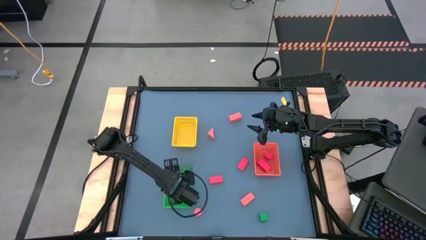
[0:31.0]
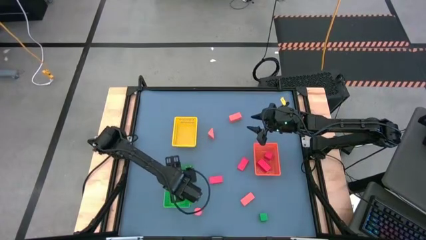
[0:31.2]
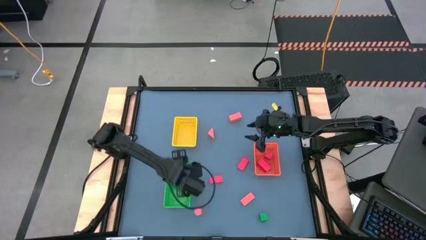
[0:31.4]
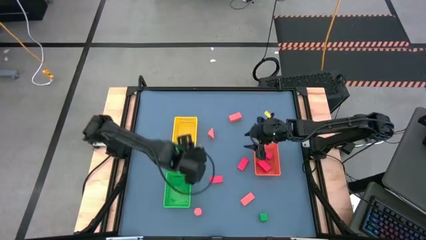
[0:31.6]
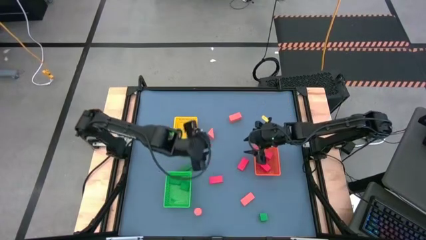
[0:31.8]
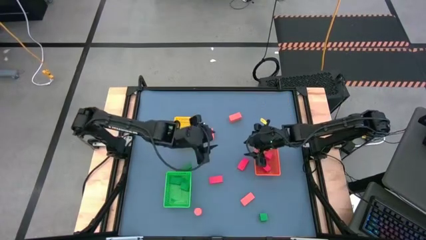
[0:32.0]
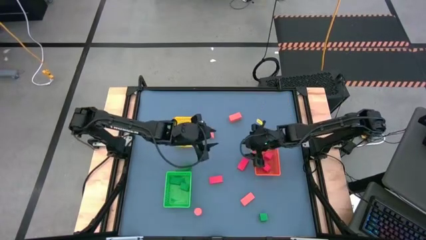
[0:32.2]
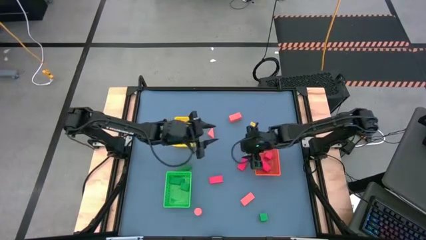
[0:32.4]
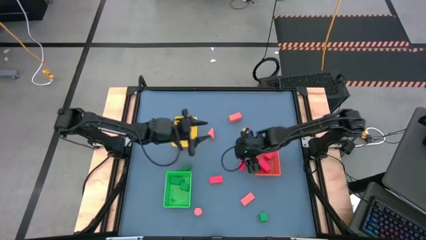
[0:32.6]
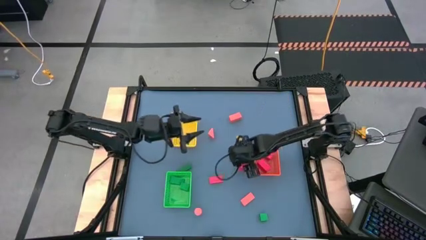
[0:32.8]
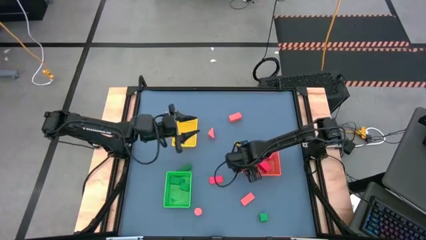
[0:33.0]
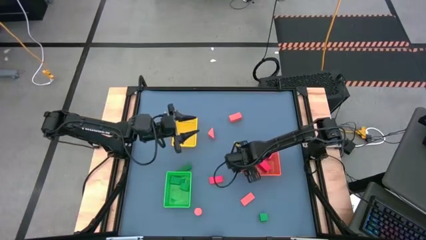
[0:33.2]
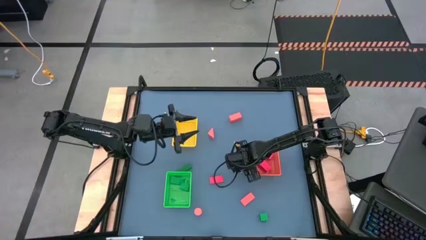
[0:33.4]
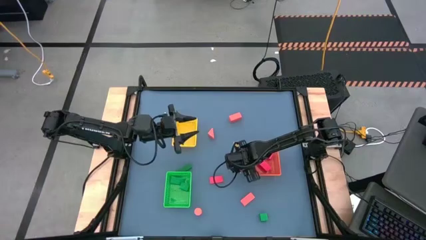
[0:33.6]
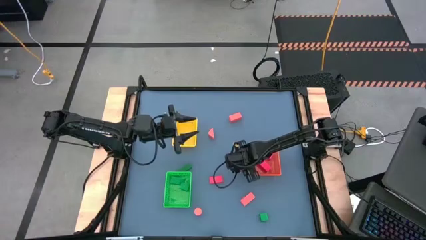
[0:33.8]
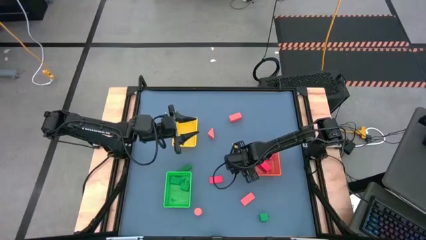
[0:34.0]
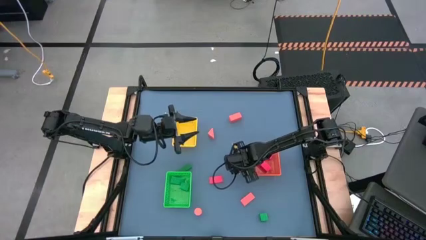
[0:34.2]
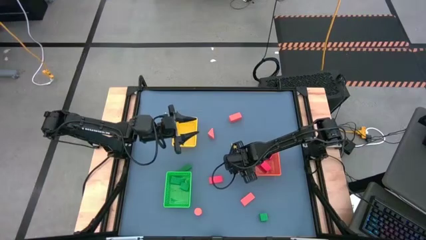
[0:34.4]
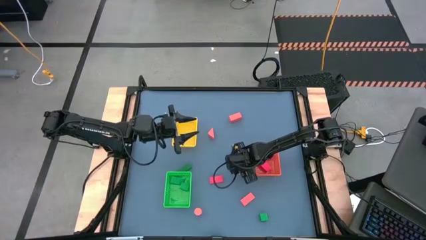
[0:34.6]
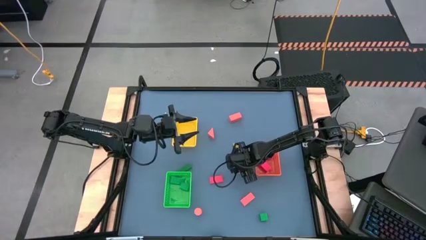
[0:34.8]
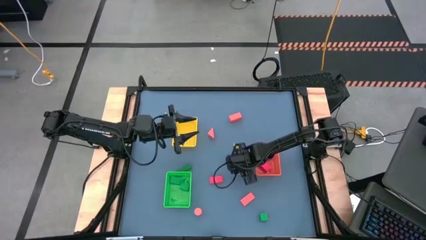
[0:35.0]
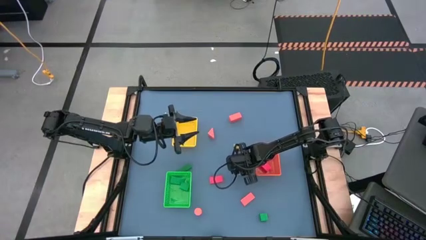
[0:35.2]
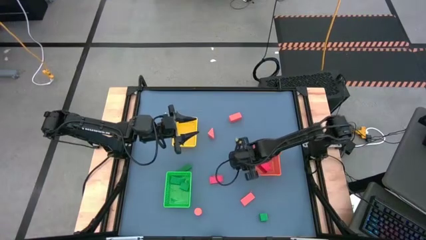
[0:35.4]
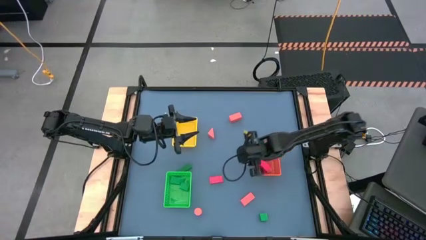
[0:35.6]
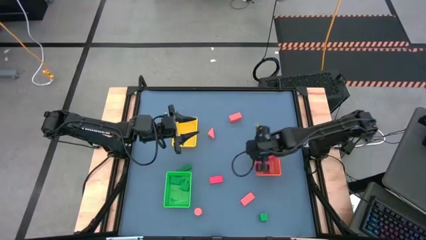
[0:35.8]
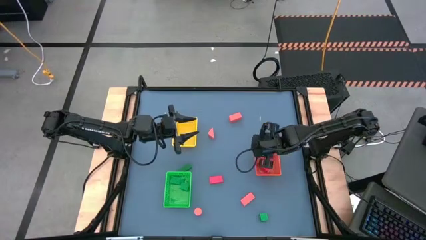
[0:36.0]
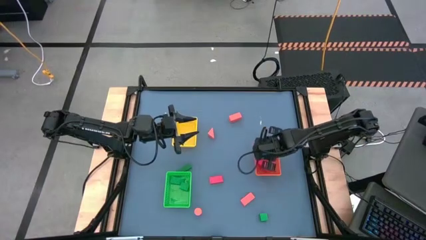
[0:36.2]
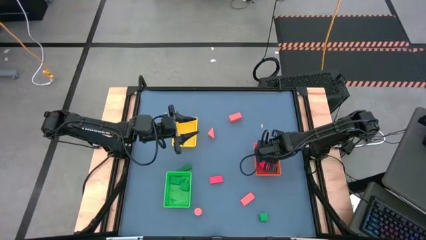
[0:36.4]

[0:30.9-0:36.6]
Task: Sort & place blocks by color
Put the red block into the orange bin

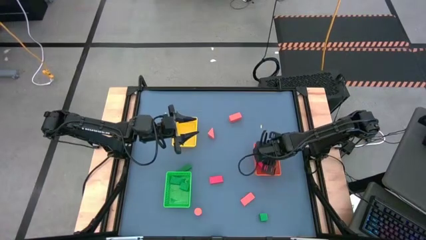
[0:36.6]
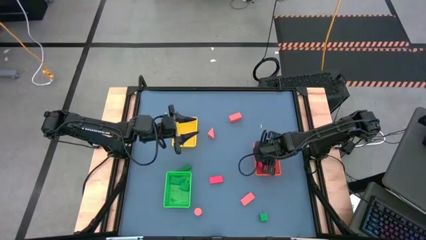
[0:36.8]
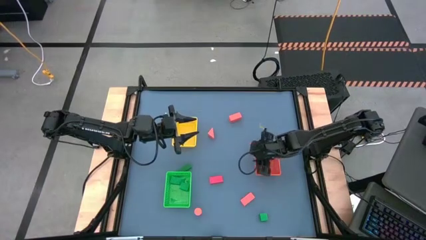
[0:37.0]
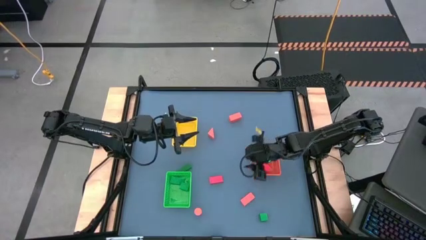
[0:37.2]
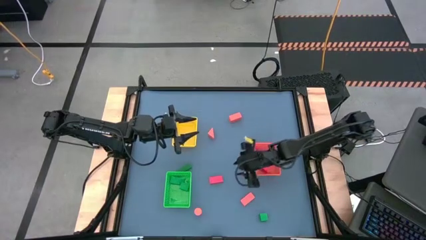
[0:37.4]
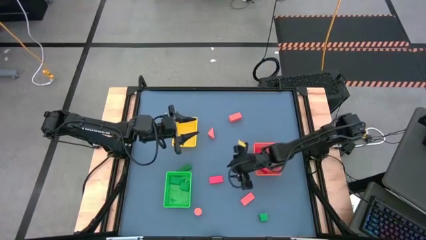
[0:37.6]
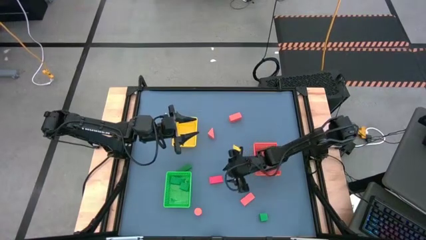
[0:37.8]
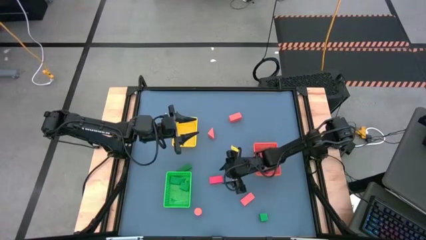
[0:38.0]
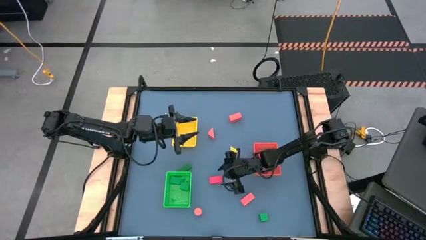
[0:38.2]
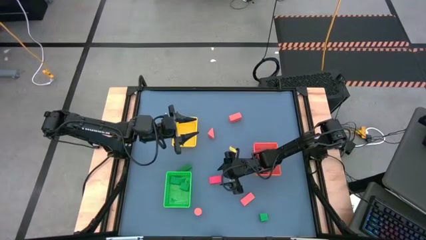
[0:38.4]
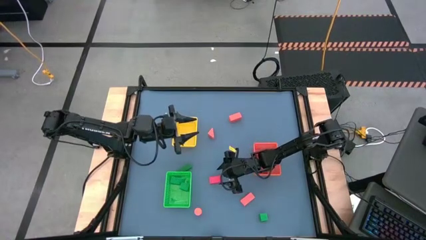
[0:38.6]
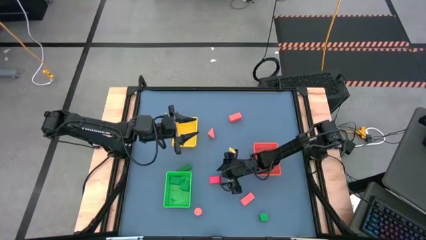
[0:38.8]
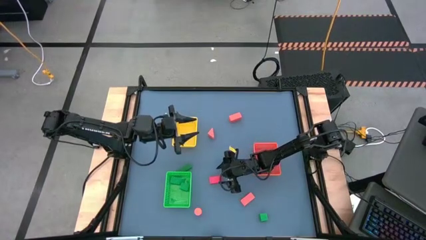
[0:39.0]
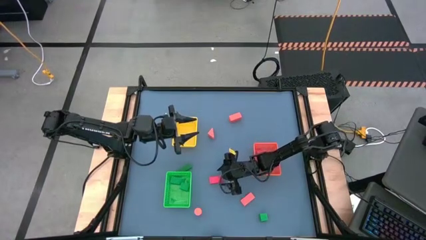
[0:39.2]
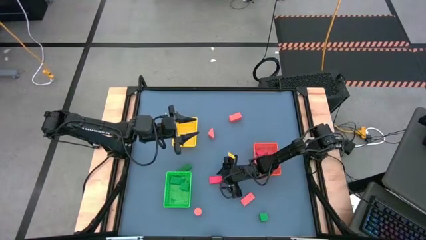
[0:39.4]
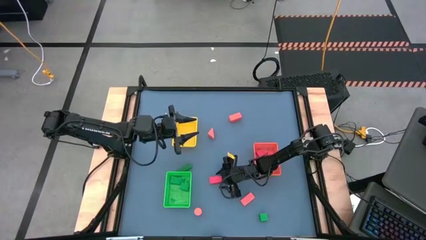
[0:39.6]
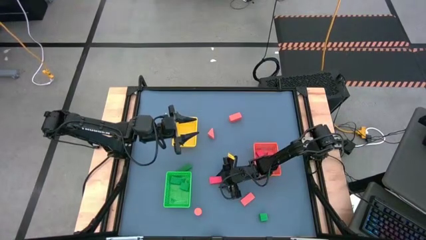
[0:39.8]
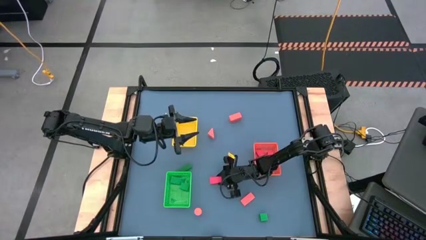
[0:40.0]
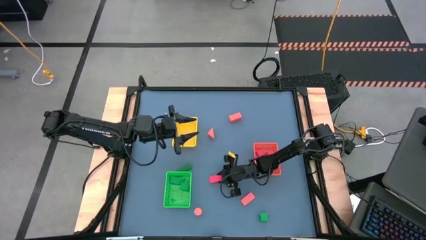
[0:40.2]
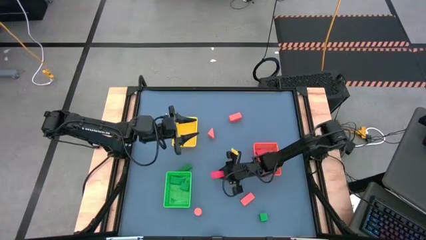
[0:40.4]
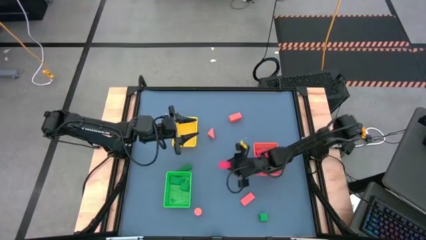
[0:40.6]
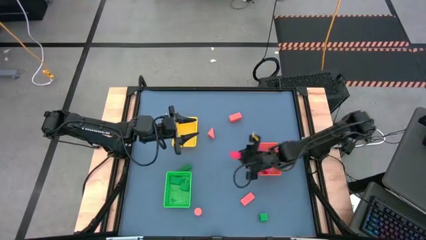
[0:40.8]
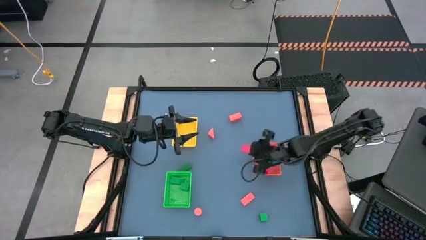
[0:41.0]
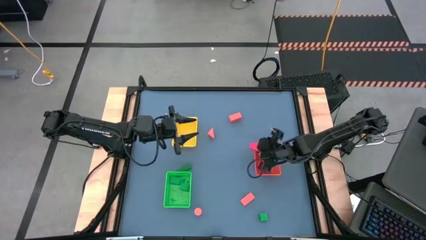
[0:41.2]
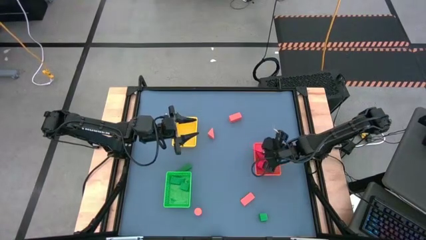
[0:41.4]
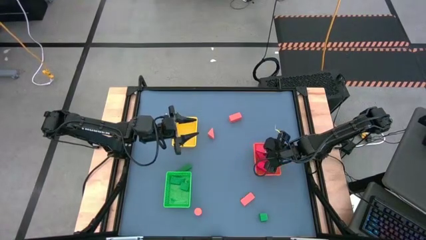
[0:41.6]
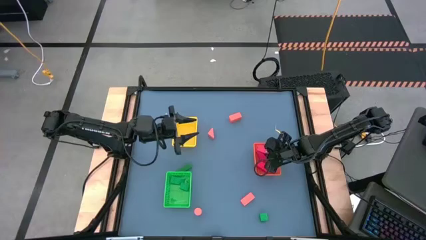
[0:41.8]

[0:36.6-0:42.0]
Put the red block into the orange bin

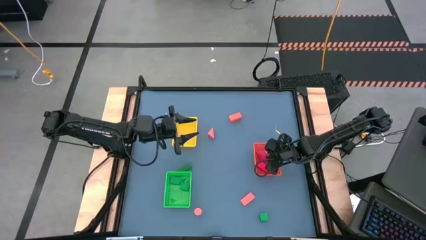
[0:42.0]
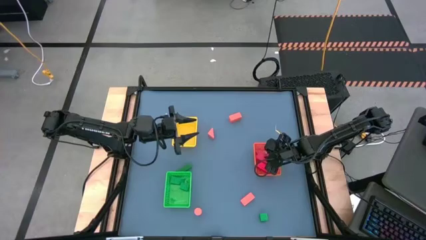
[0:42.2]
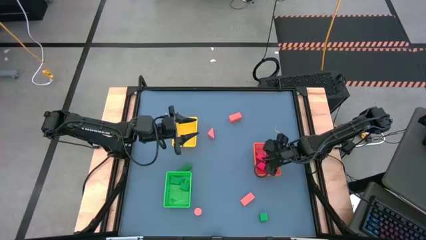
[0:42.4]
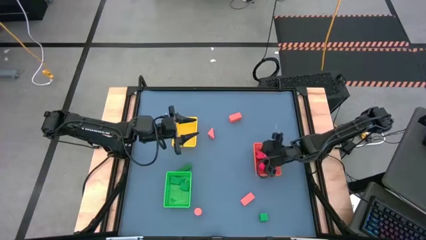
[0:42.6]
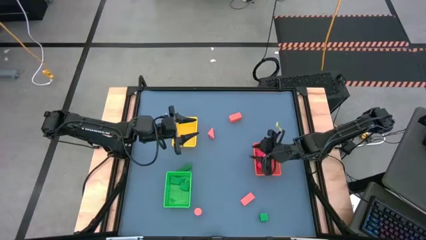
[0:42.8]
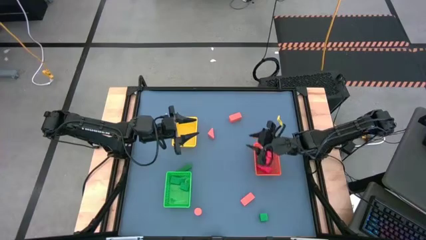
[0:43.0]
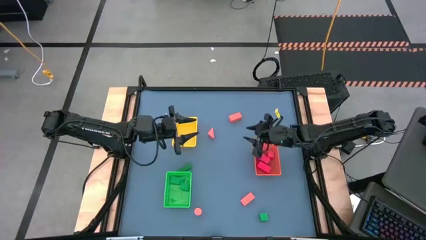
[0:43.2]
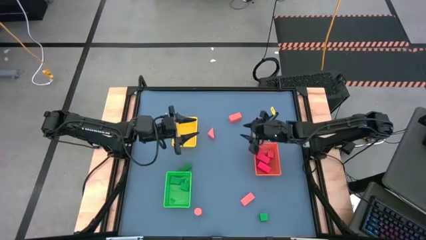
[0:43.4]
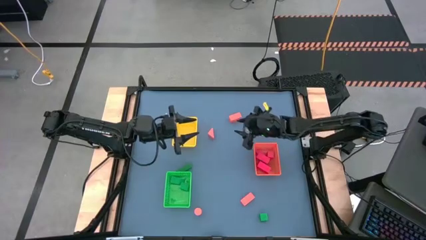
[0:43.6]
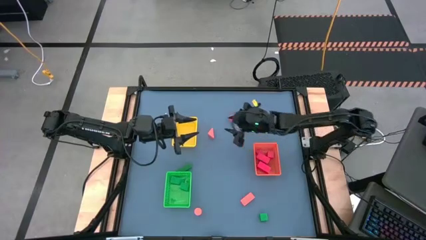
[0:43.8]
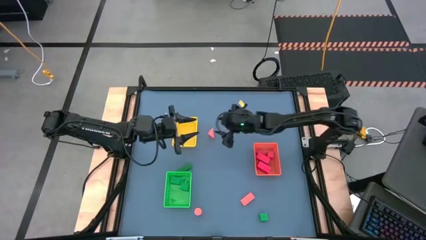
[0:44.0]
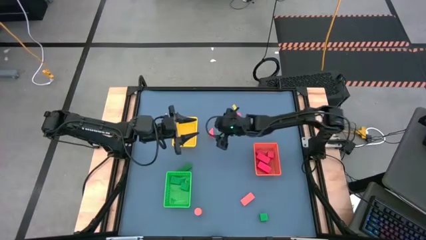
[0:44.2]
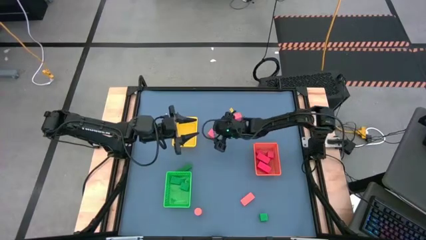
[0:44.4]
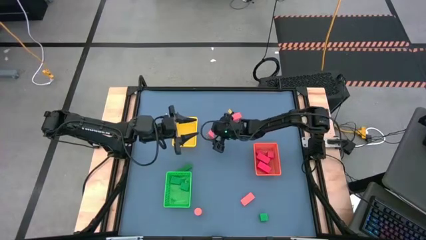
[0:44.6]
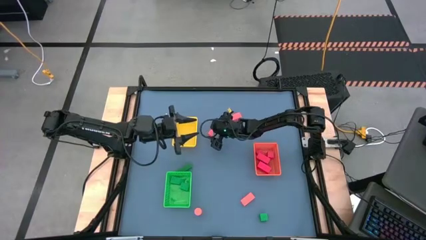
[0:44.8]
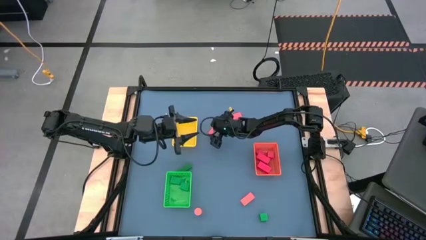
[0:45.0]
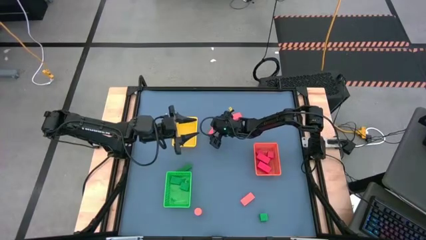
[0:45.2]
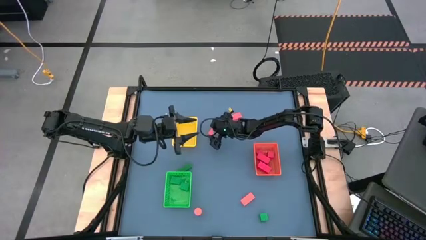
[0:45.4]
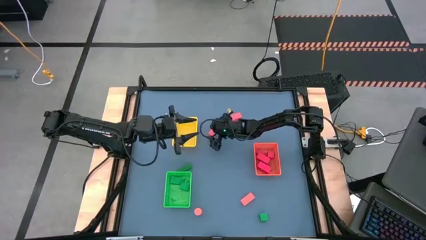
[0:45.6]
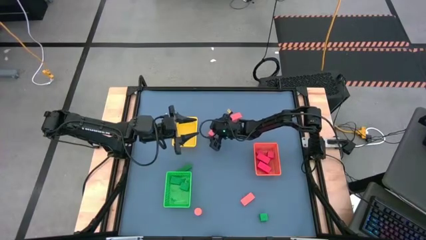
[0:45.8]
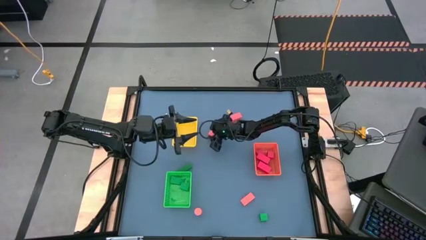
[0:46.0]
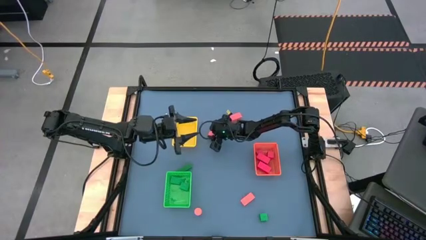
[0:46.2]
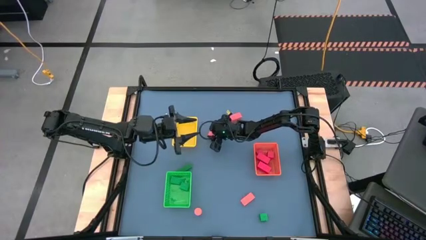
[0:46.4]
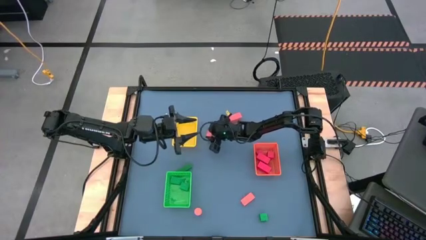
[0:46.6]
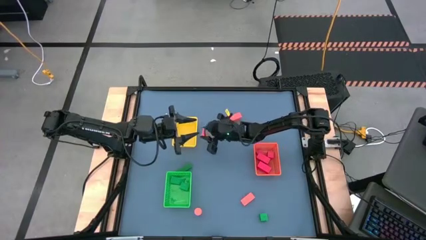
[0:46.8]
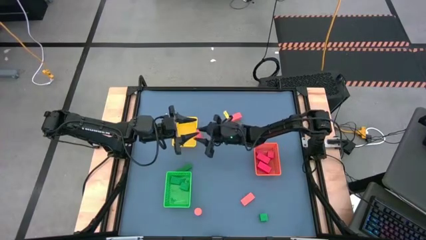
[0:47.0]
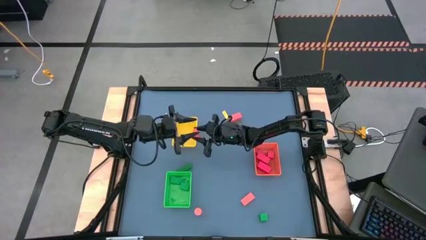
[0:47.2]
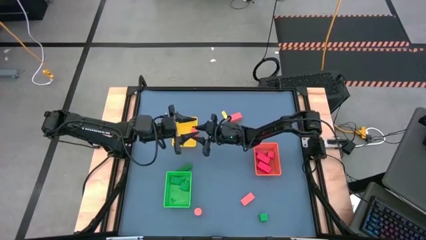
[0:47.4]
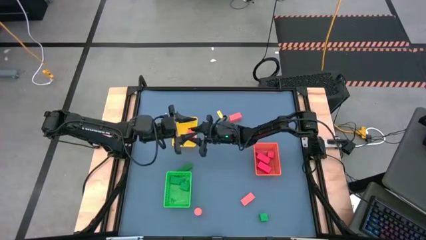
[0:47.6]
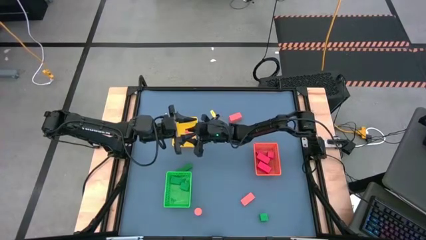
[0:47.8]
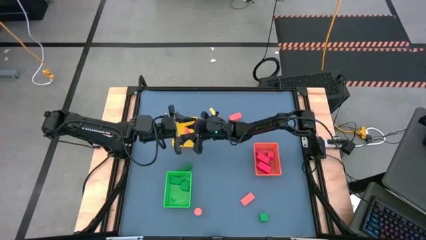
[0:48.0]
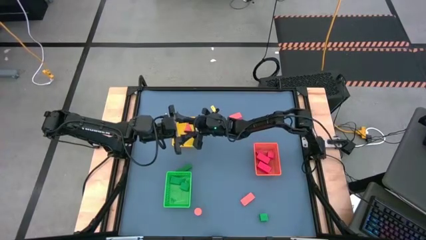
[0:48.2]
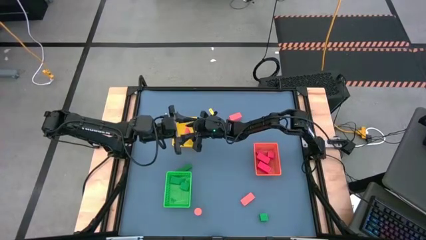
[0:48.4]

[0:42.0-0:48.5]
Put the orange block into the yellow bin
